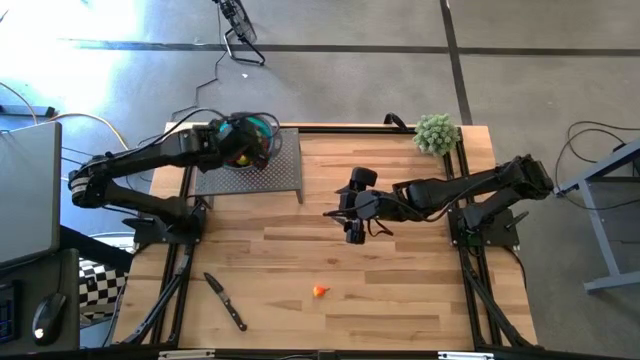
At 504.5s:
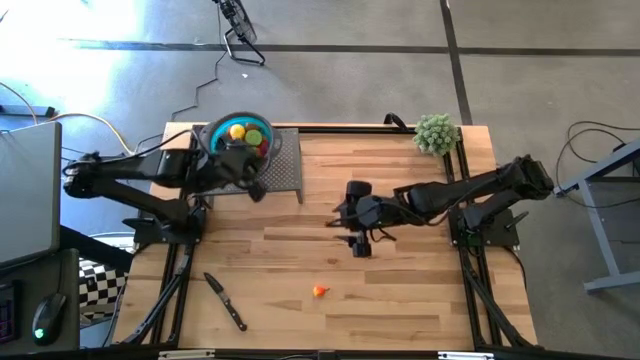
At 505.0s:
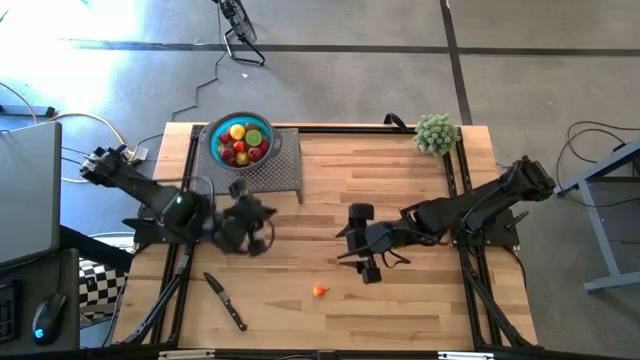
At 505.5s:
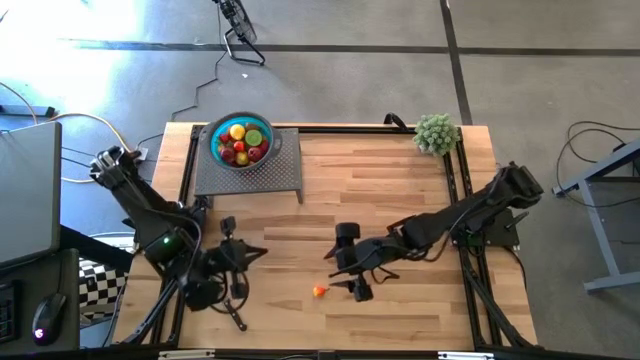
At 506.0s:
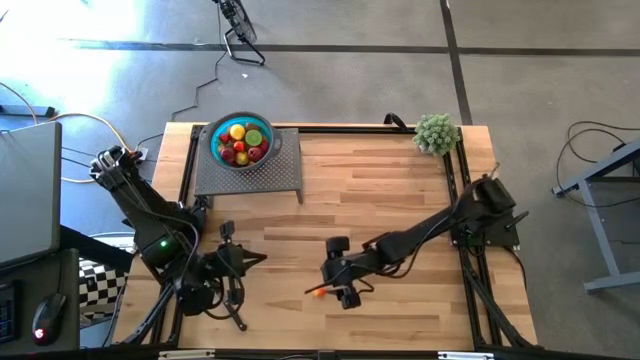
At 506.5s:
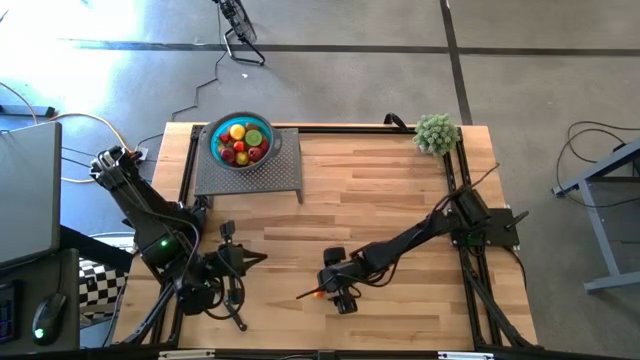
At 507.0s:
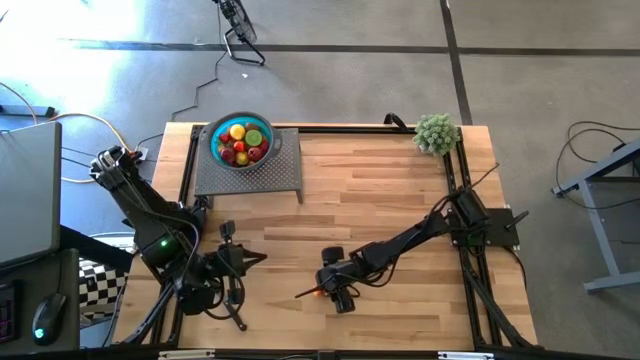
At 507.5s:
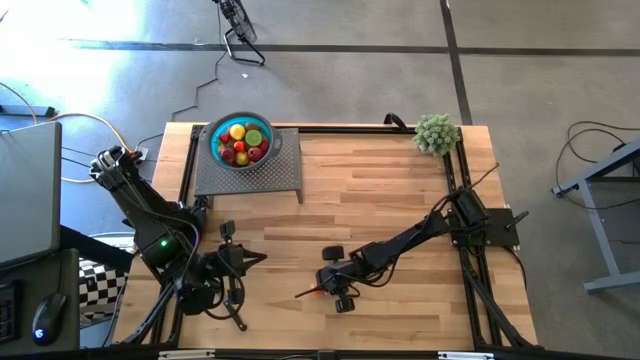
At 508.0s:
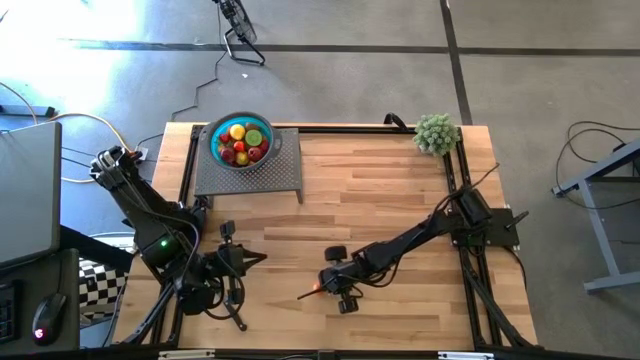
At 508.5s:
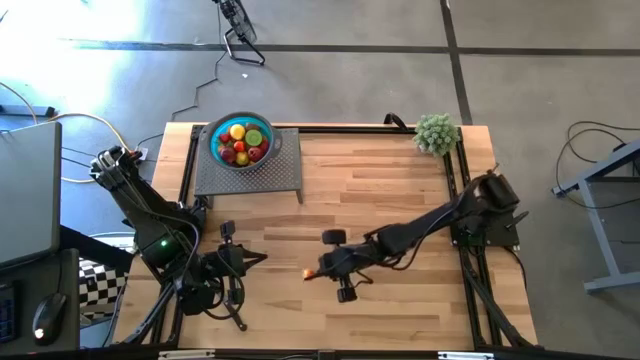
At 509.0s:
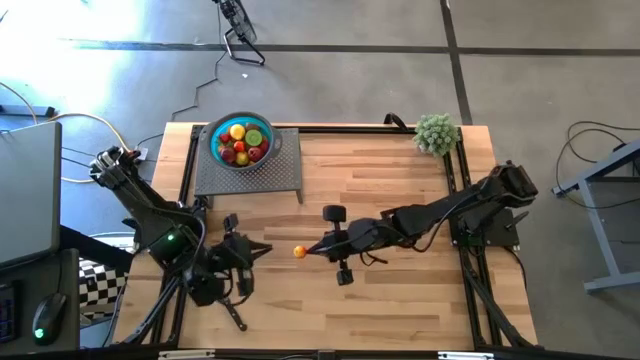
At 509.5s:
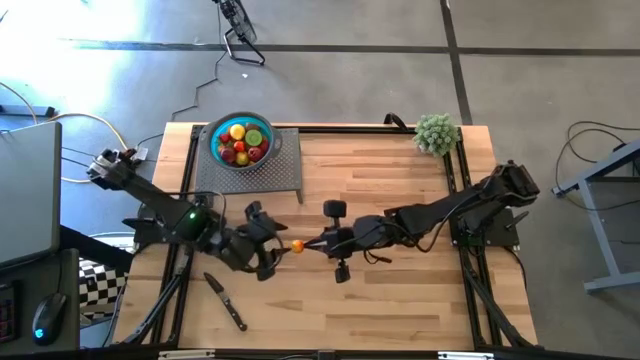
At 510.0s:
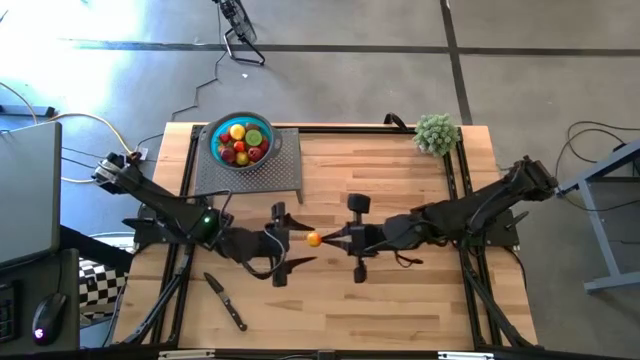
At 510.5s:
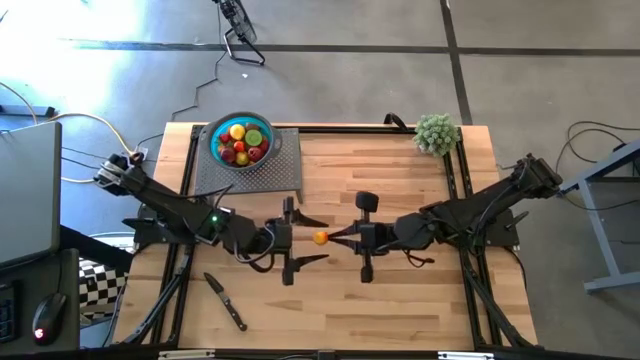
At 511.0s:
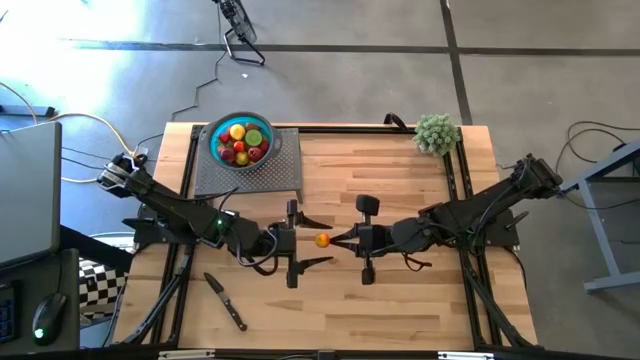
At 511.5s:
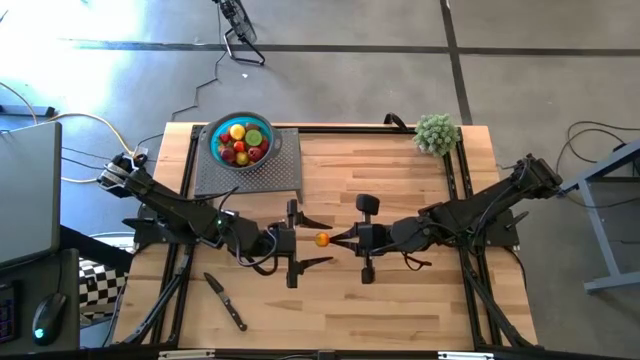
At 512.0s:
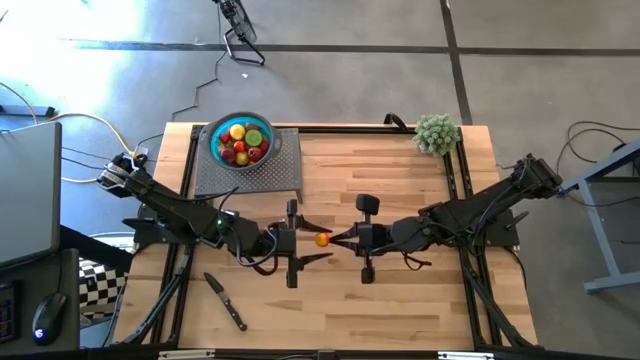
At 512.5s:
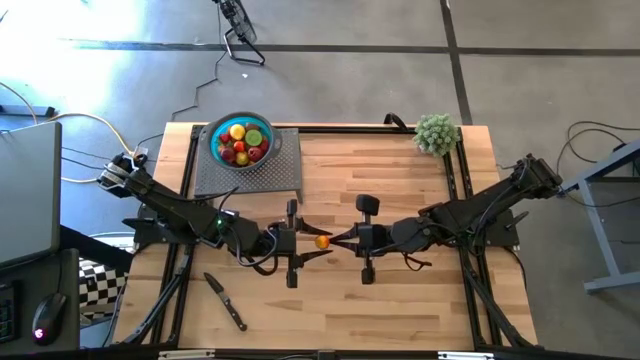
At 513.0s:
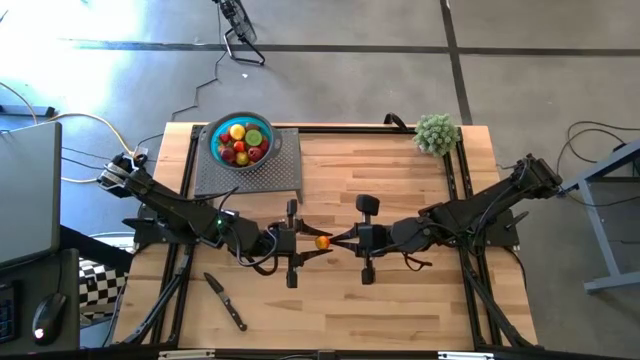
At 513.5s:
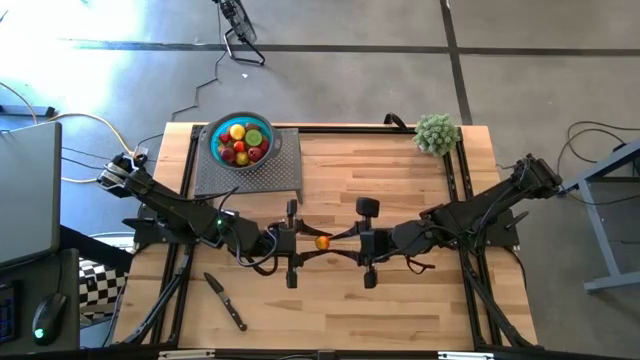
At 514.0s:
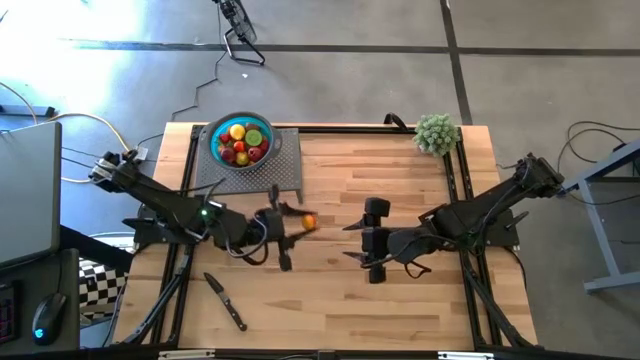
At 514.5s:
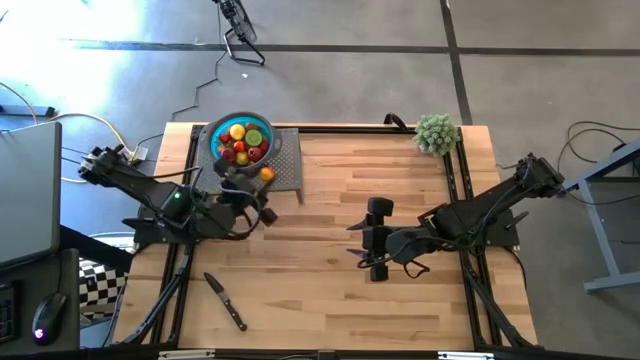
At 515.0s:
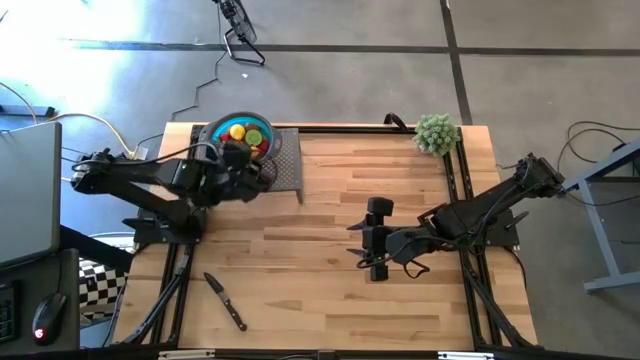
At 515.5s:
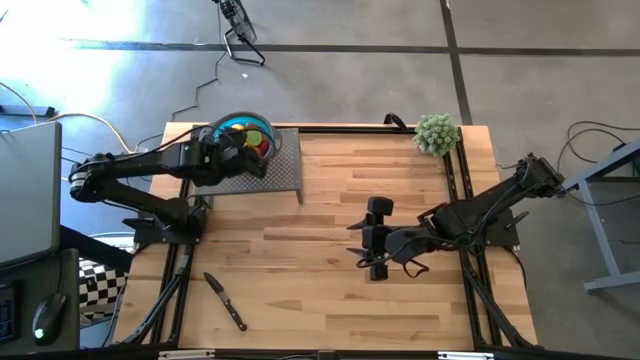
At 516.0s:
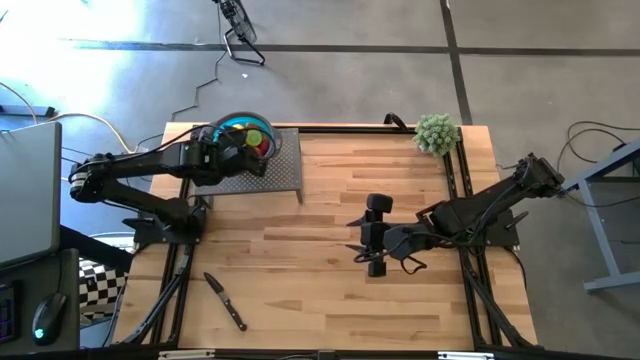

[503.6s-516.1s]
Task: Pick & Place Fruit
Put the orange pear into the blue strainer bowl on the shelf

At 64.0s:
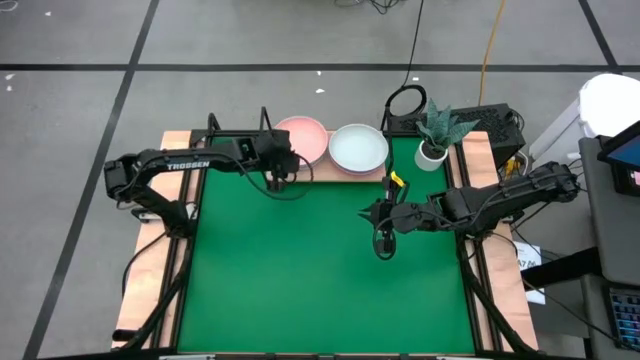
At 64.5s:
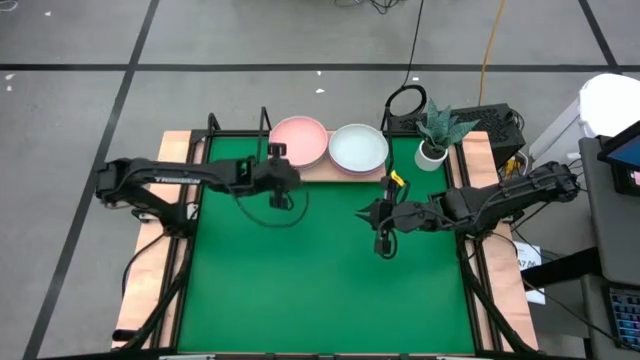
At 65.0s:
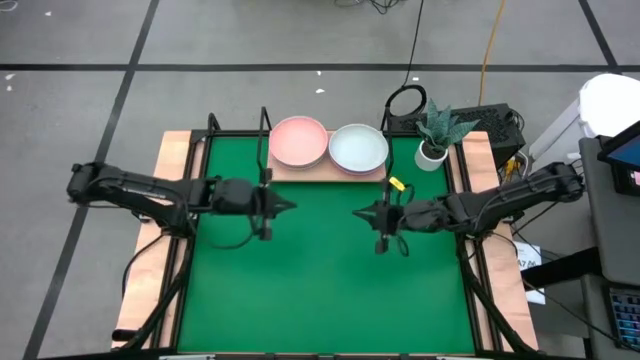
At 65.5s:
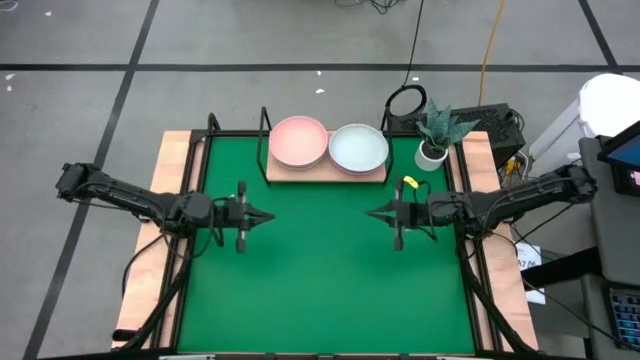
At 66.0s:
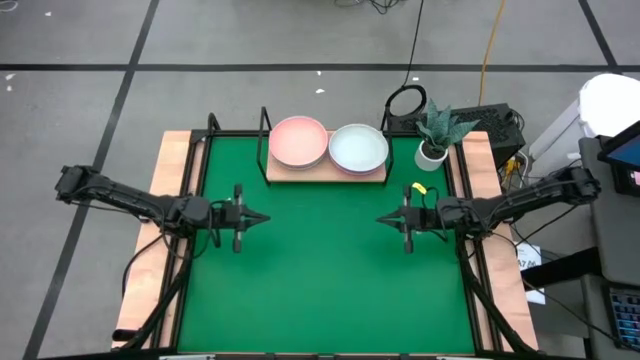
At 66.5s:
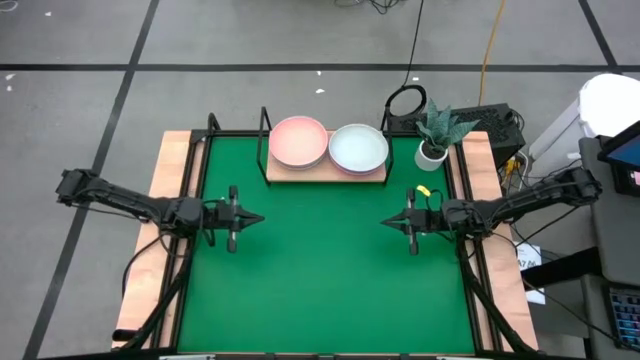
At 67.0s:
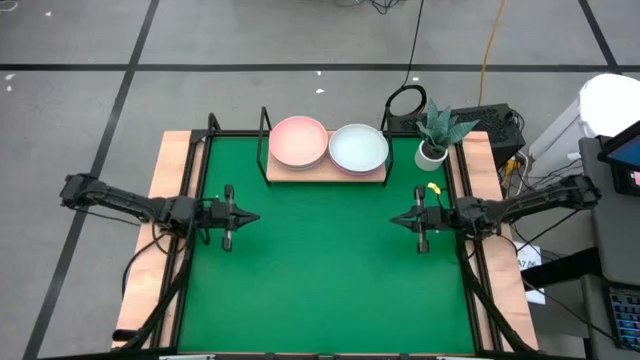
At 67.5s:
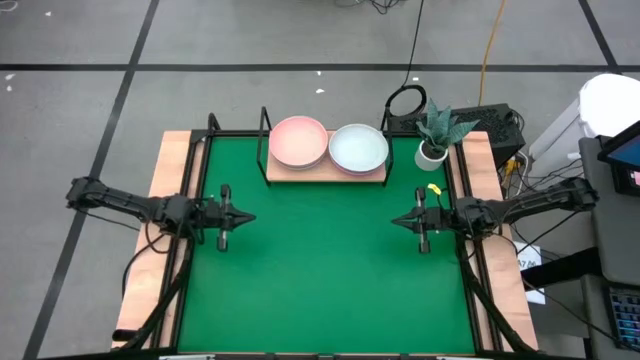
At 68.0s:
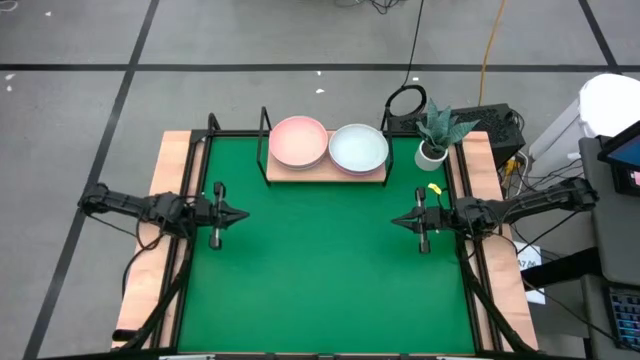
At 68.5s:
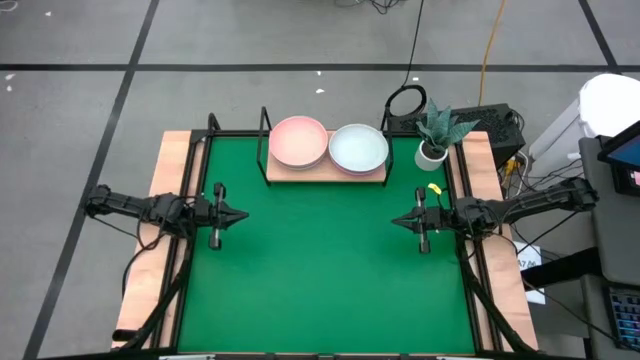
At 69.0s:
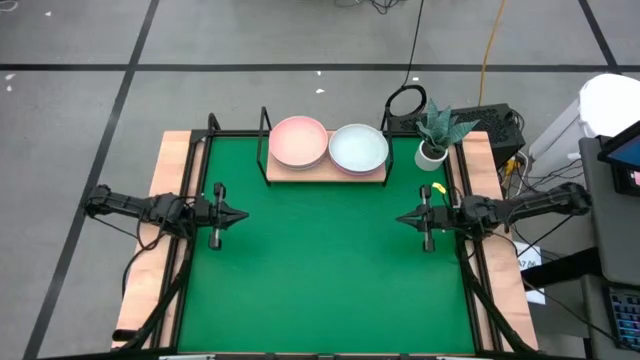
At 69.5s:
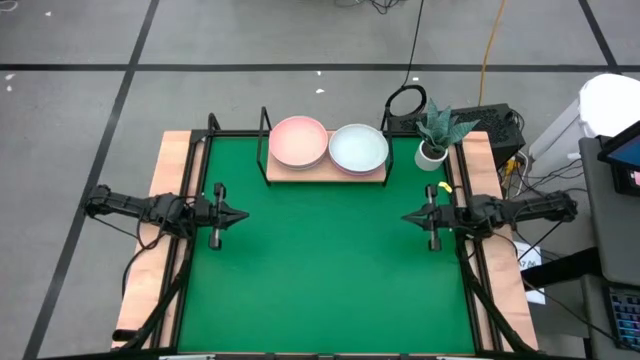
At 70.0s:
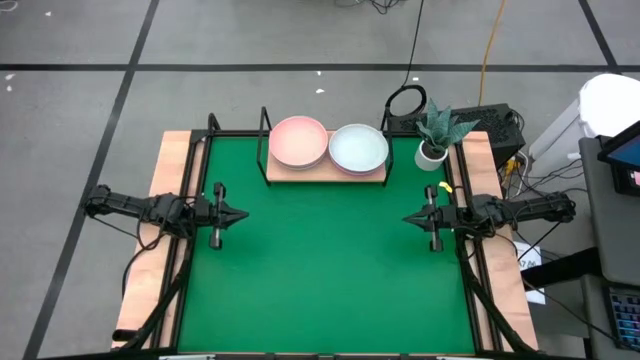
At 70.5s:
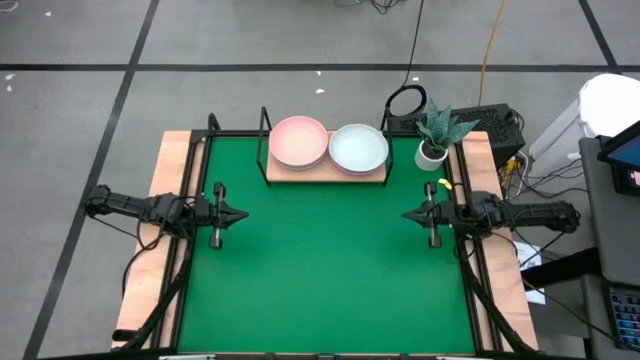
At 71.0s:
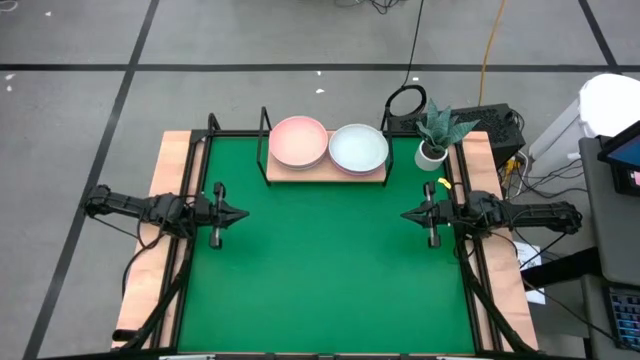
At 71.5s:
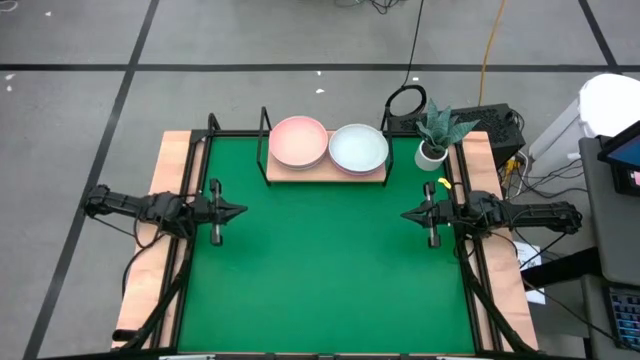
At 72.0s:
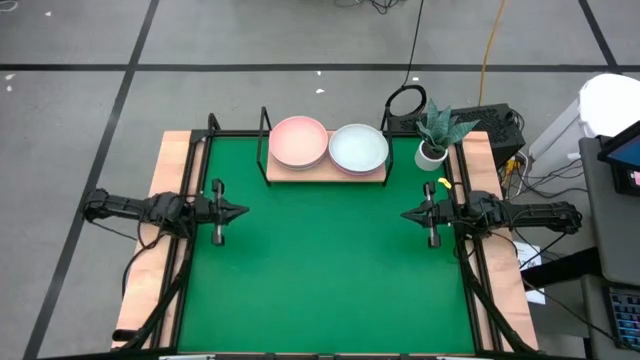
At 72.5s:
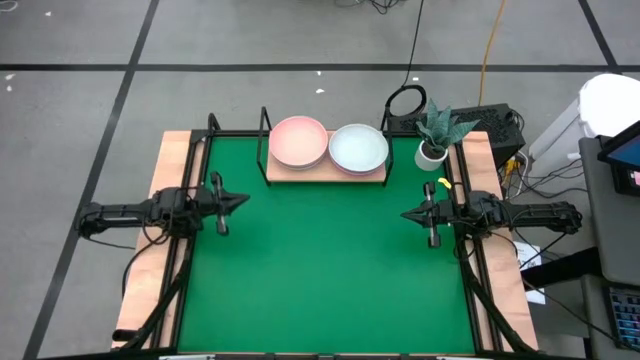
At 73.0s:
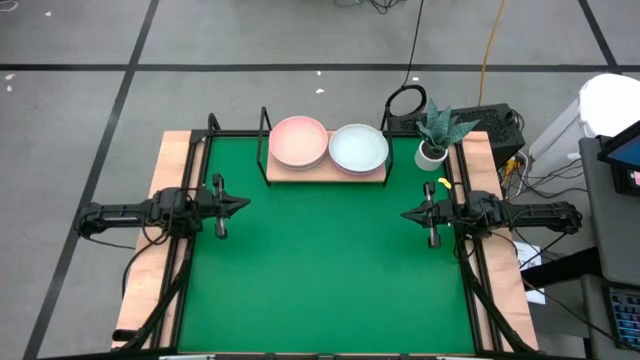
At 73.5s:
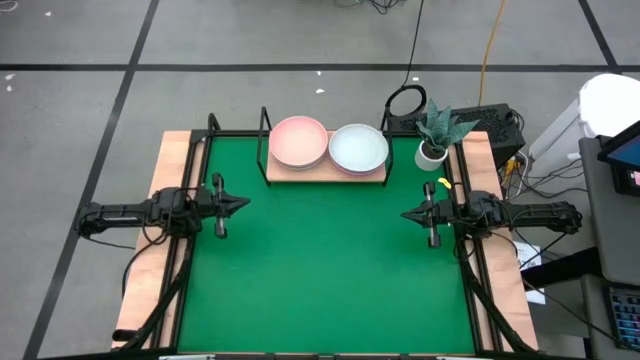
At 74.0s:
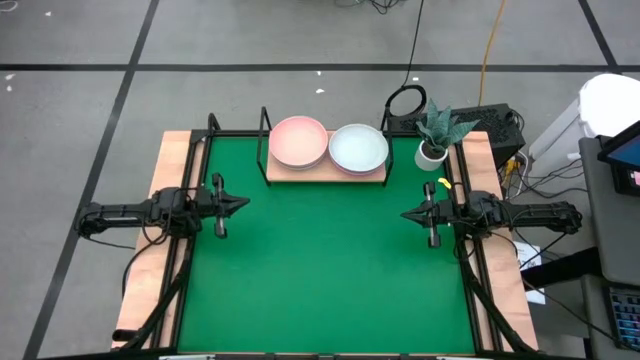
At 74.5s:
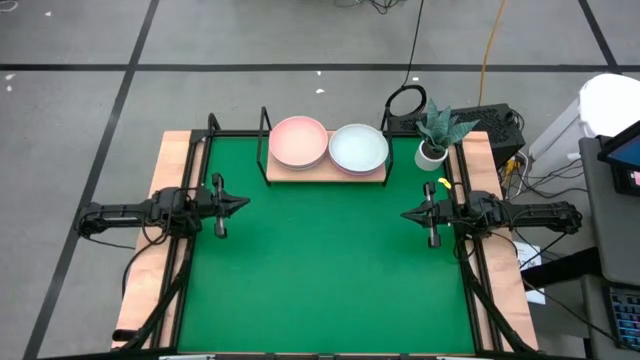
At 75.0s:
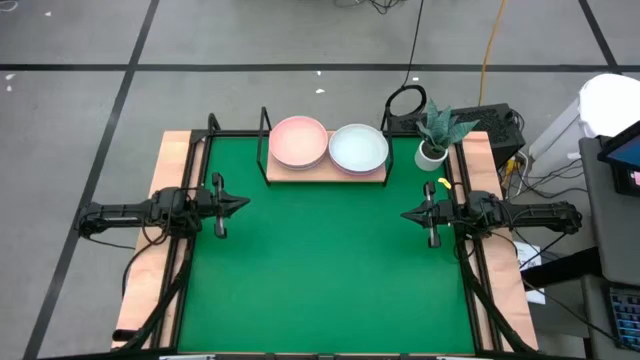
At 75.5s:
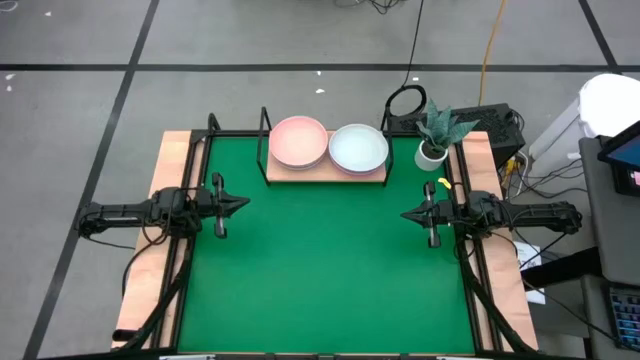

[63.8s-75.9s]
Task: Place and stack plates onto a shelf
Return to Home Position
